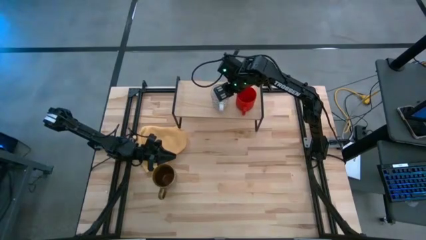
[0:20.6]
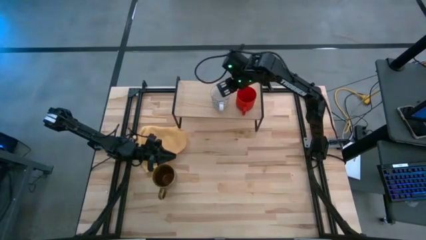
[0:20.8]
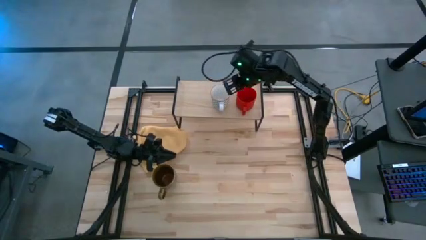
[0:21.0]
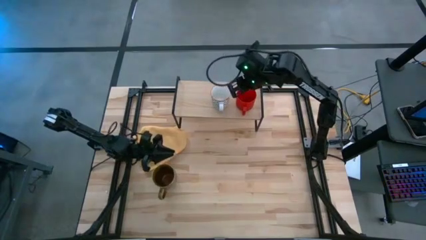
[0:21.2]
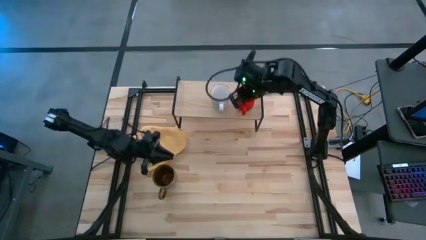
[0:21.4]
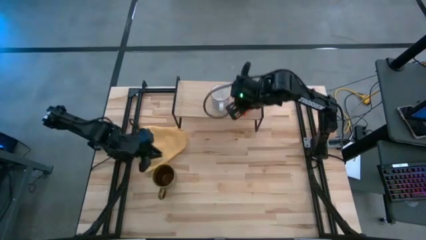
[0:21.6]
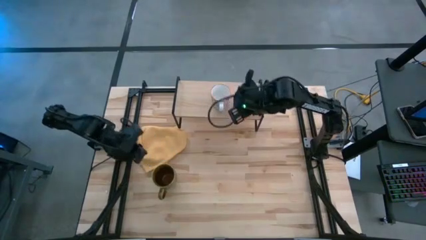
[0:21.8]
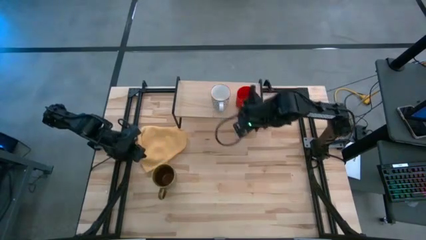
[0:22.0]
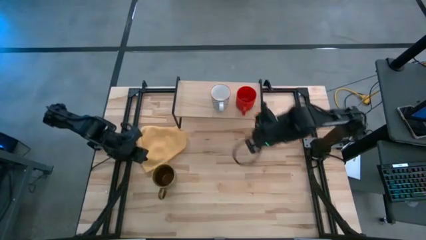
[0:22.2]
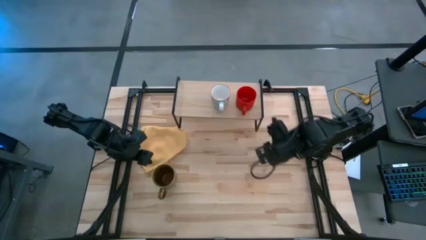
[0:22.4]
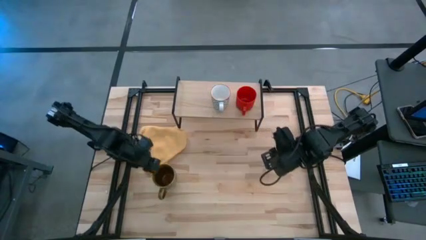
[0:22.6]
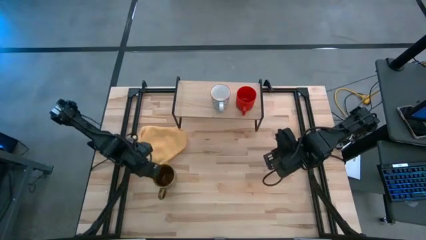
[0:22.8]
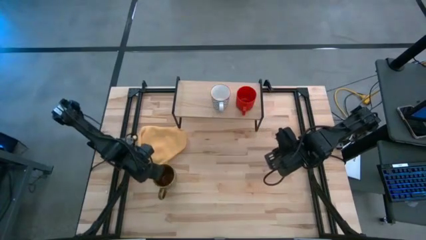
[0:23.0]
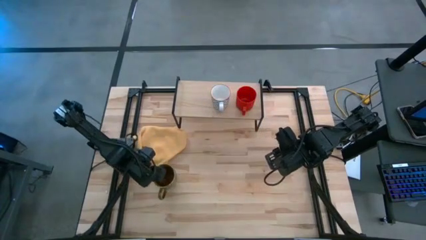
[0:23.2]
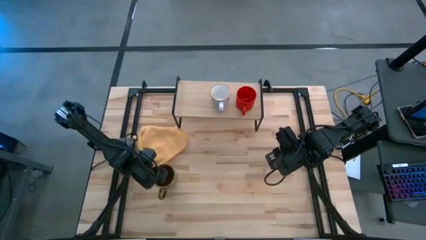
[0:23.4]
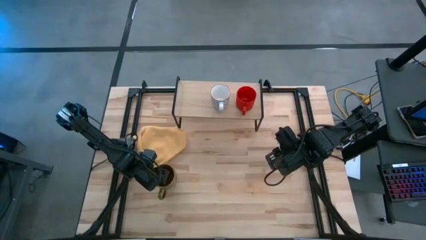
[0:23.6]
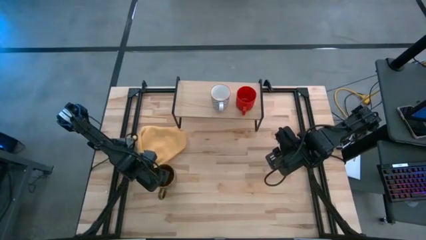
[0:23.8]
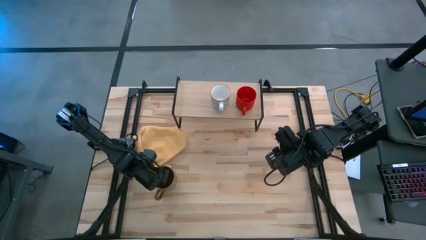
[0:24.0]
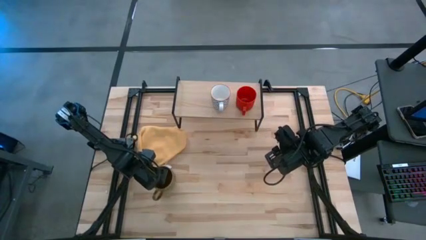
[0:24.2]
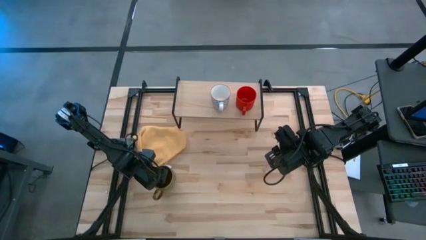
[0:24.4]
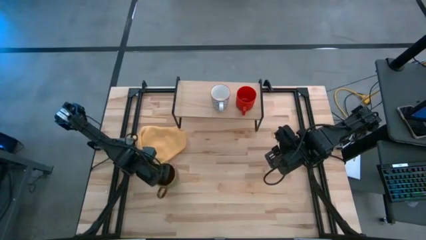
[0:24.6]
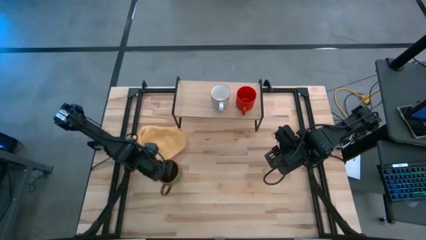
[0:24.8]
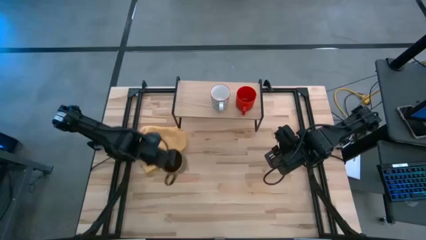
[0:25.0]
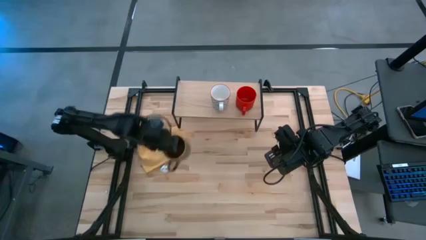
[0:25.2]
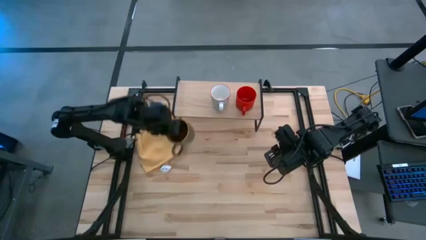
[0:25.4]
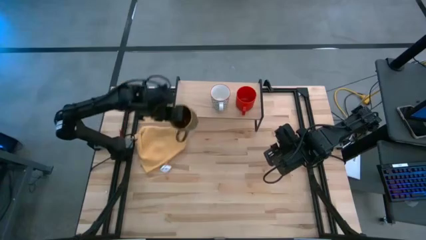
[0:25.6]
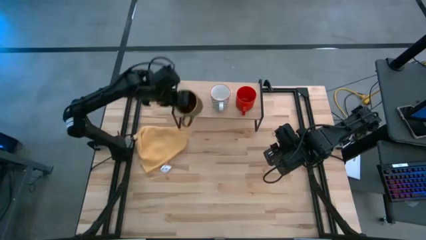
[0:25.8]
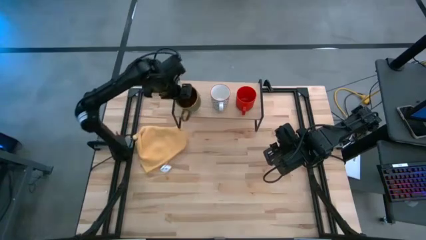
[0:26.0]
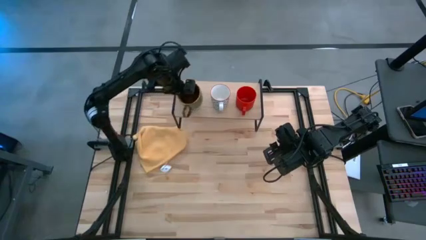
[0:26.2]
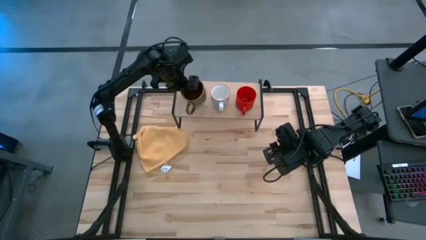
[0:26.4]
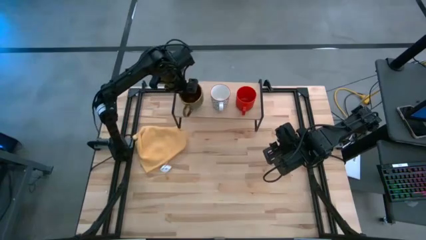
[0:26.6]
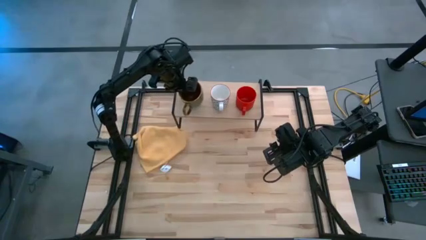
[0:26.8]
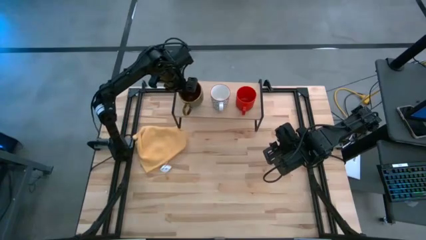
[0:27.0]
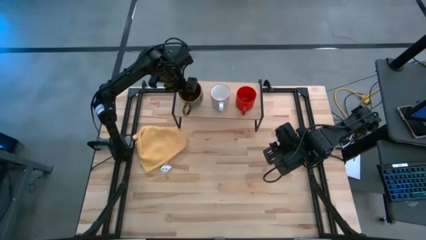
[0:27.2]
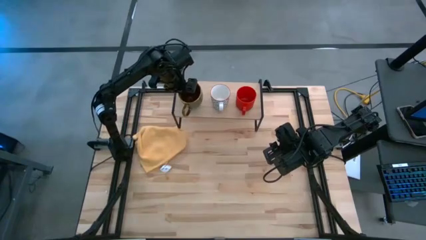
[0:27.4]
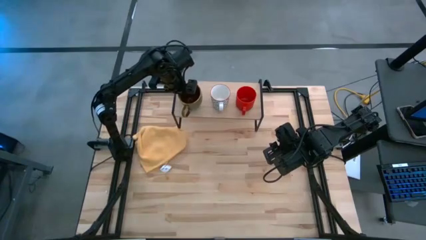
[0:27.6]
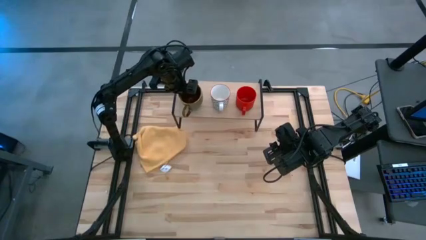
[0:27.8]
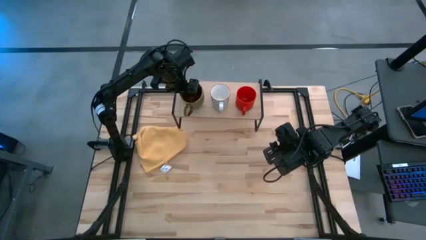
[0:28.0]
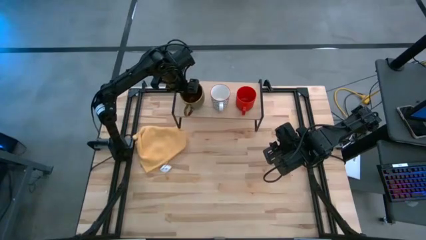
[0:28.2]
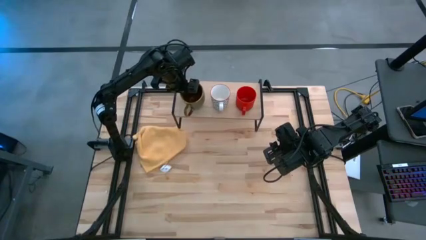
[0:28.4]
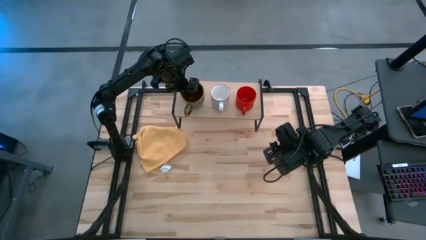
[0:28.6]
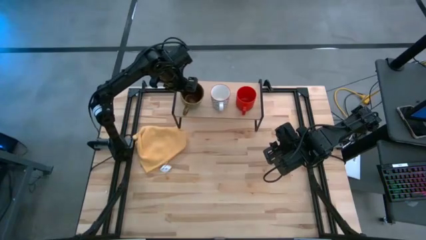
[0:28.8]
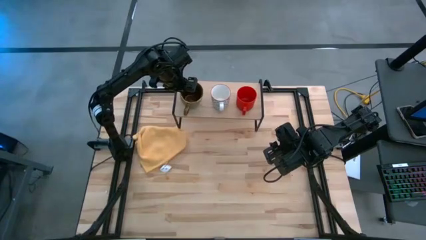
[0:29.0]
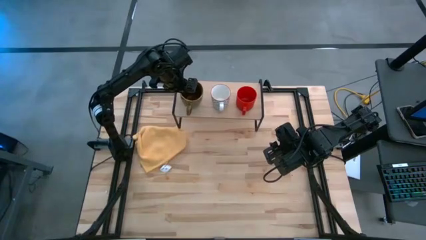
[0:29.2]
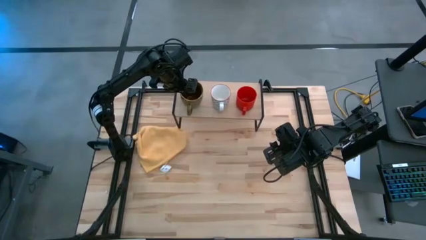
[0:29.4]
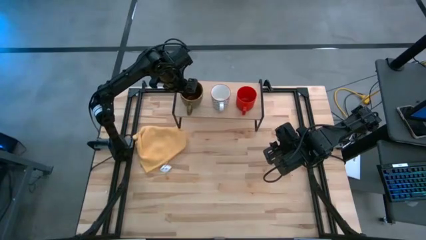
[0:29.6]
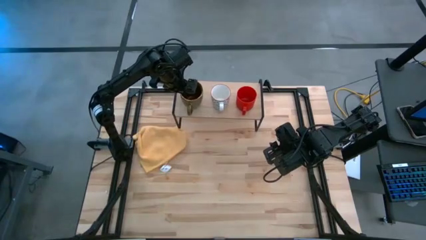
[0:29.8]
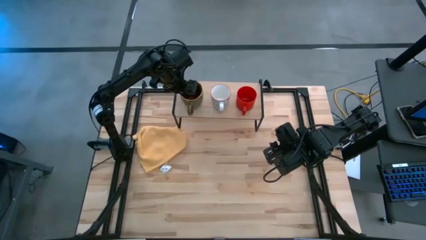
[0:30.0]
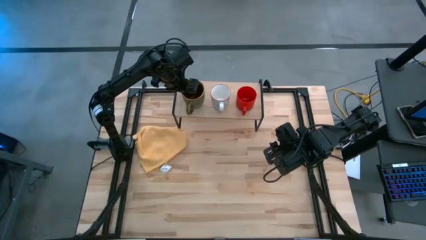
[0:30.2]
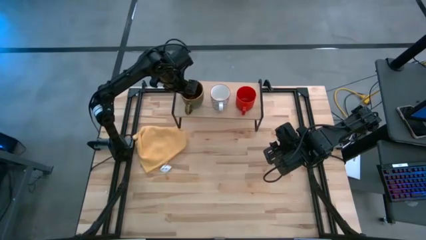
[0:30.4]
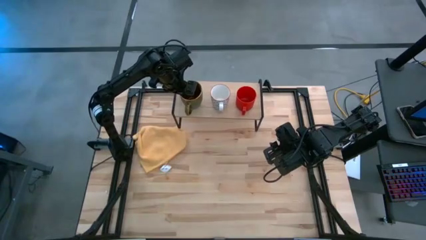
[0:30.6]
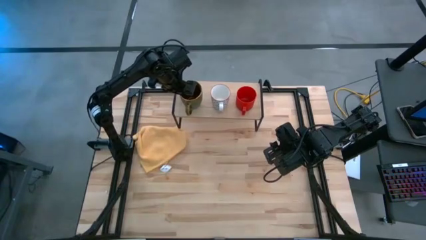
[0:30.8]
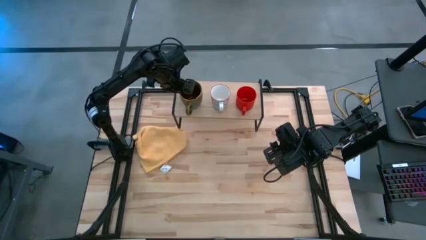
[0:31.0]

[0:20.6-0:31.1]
Task: Stack small to large cups/mugs on shelf
Put the brown mug on the shelf

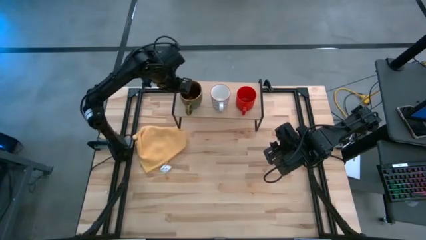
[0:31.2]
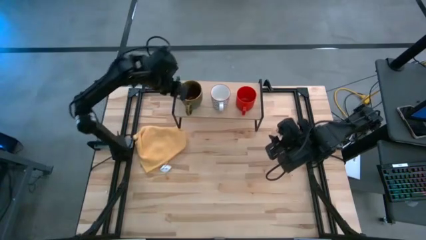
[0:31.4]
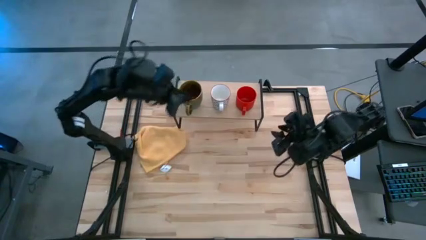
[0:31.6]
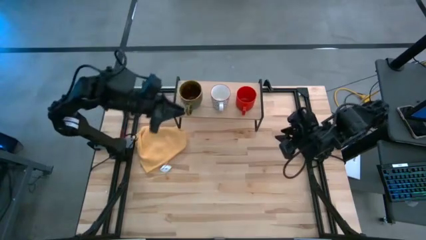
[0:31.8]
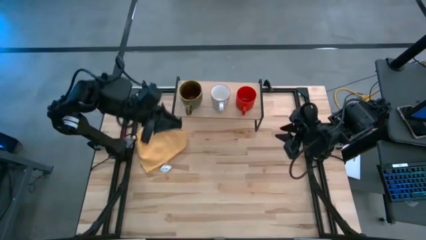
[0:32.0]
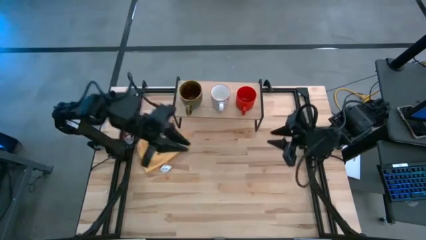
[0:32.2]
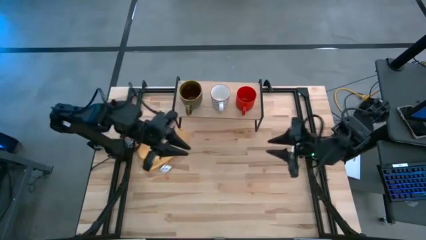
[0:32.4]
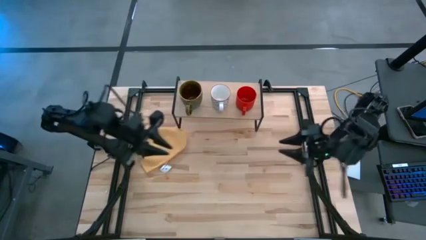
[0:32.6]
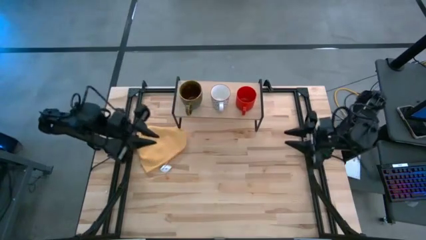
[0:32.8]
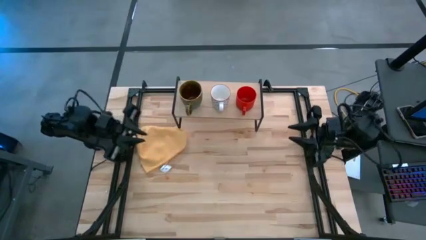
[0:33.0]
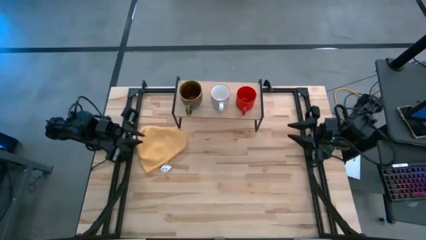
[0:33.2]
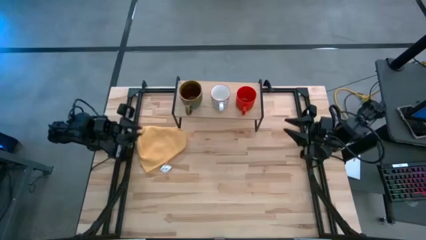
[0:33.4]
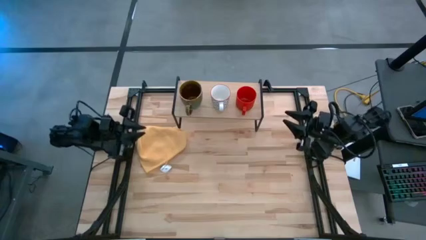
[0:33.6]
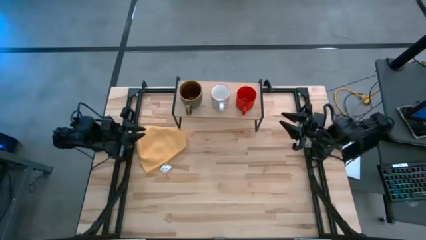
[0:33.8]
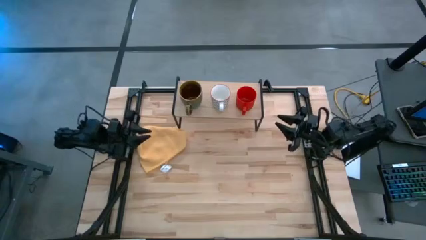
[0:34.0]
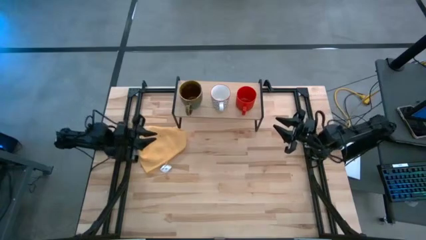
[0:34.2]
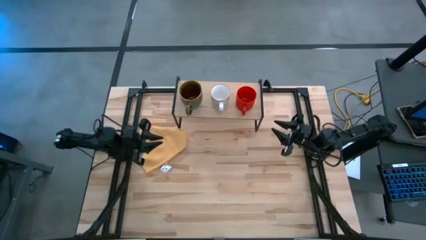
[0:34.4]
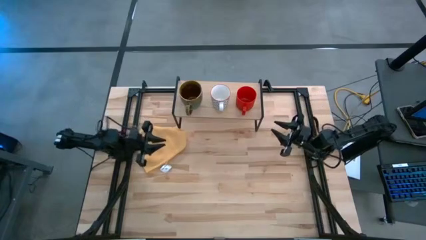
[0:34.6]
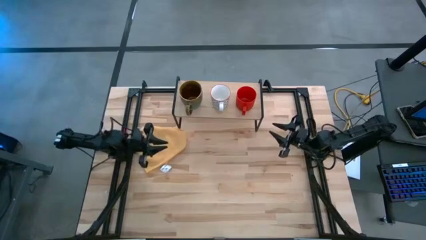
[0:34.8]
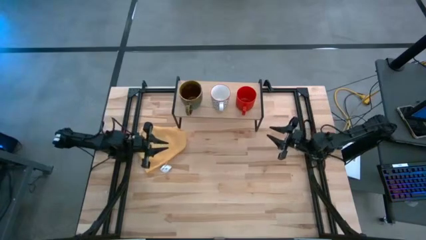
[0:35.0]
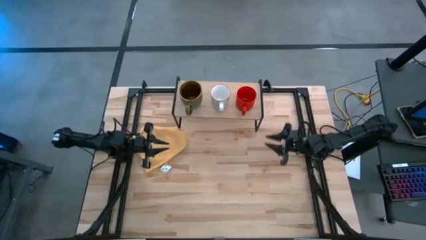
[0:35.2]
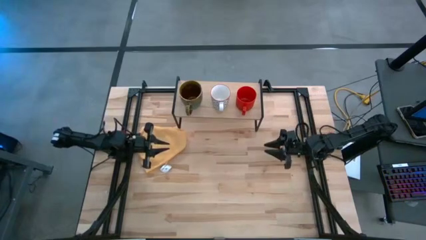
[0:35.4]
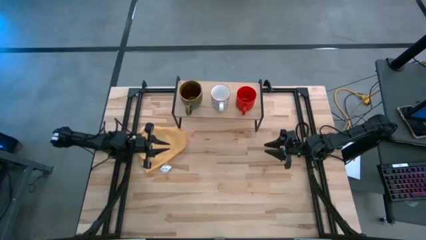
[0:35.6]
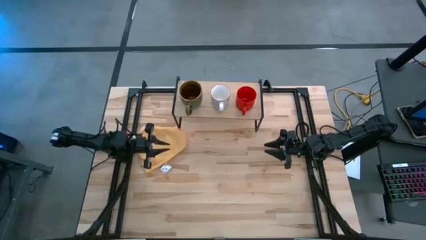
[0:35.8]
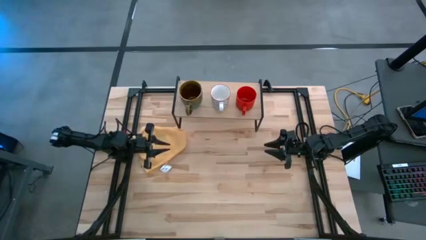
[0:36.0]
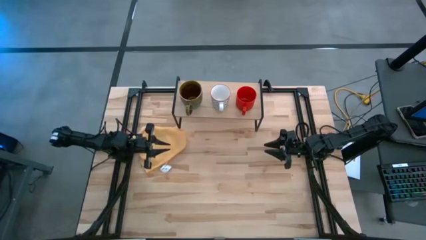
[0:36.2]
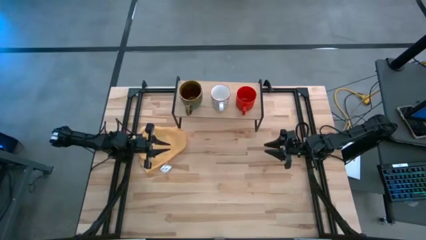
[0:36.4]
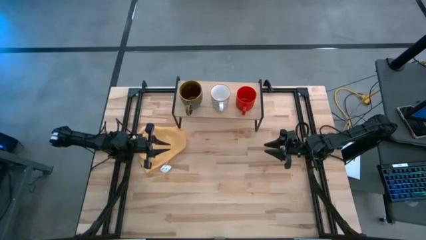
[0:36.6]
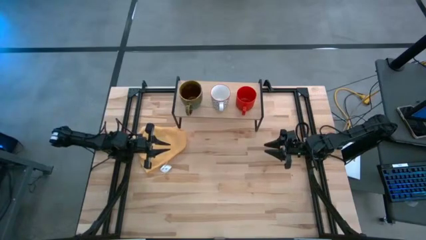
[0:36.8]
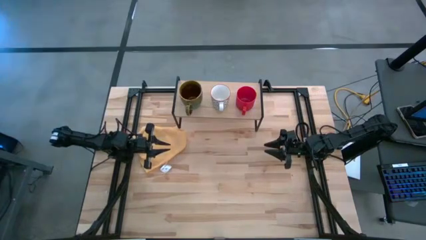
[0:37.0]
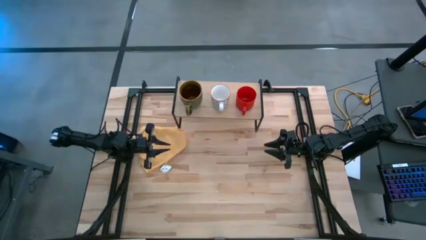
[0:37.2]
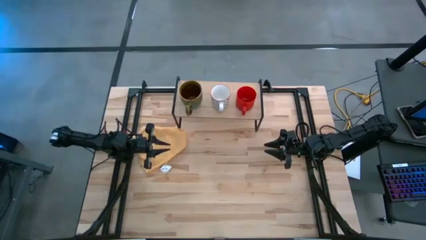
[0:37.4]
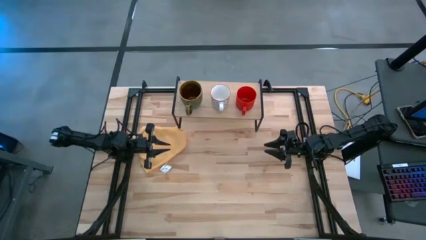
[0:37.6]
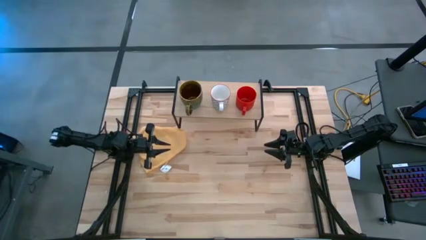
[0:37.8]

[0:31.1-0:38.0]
Return to Home Position
